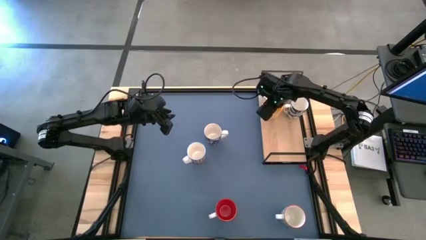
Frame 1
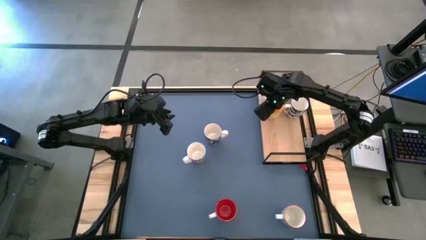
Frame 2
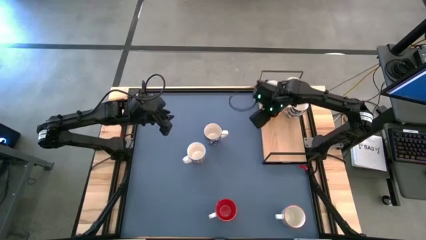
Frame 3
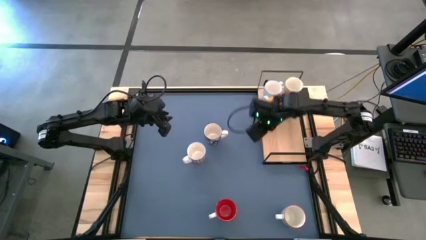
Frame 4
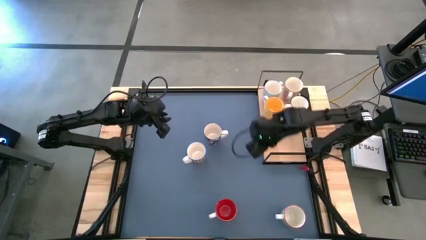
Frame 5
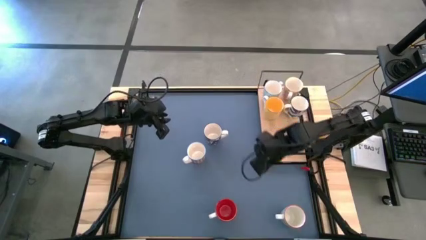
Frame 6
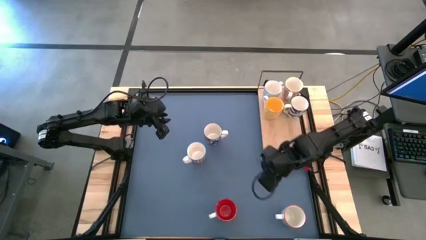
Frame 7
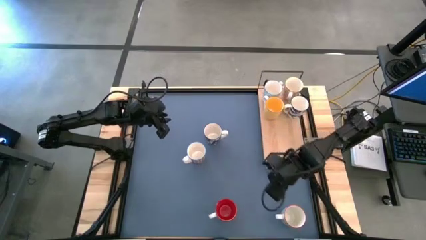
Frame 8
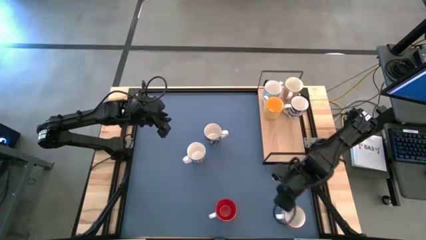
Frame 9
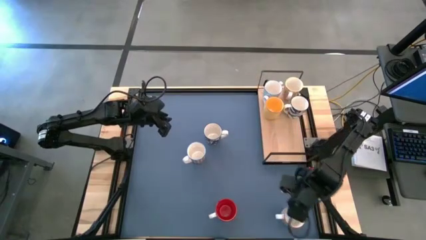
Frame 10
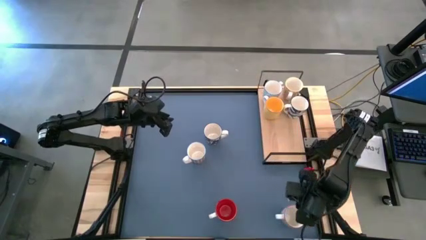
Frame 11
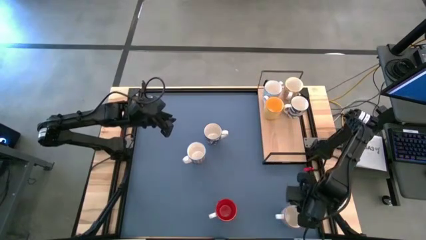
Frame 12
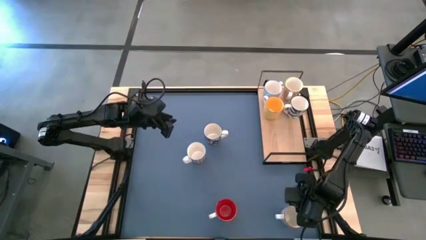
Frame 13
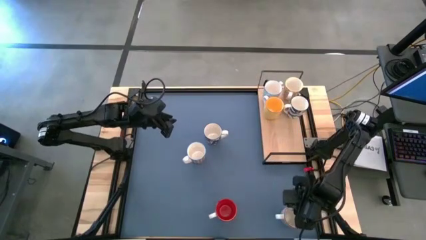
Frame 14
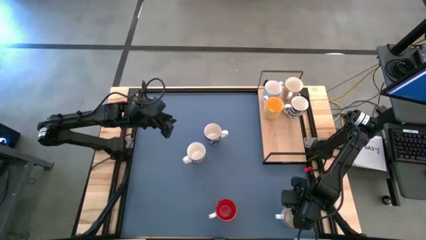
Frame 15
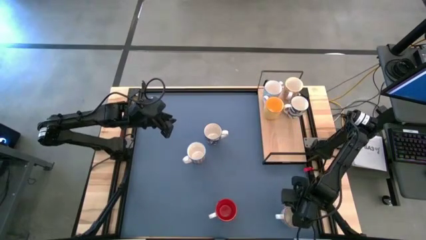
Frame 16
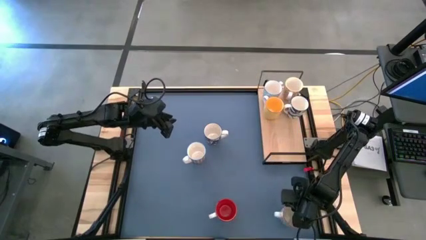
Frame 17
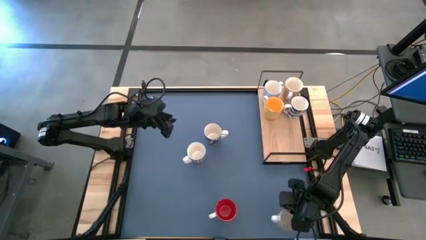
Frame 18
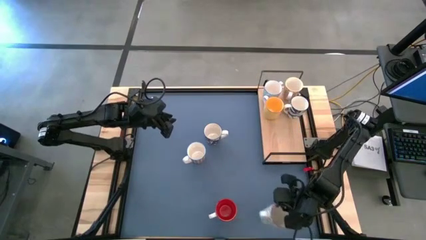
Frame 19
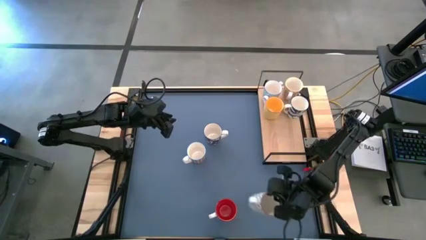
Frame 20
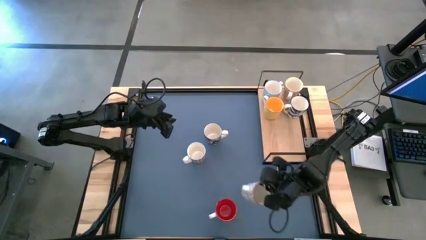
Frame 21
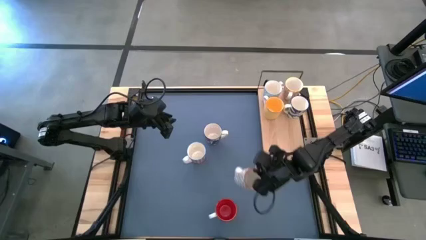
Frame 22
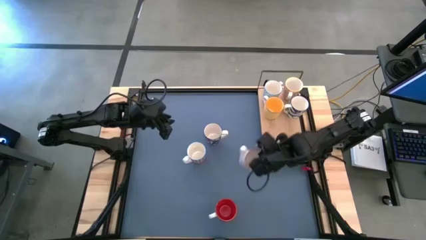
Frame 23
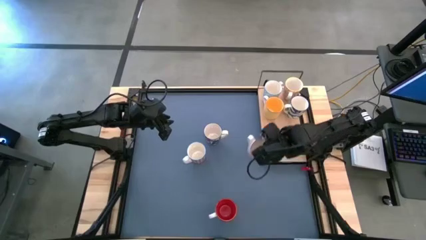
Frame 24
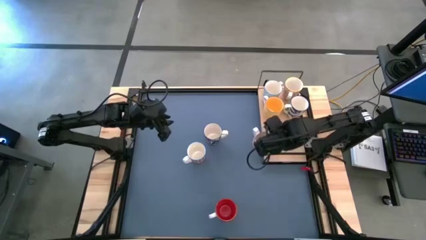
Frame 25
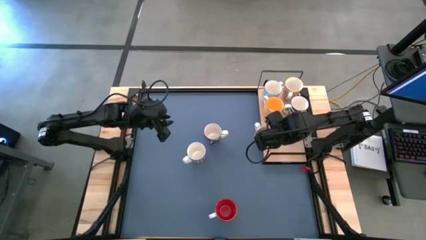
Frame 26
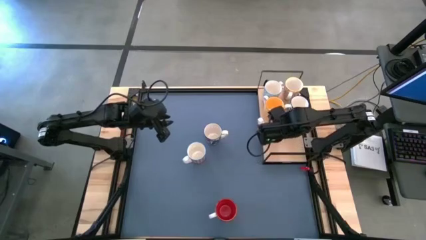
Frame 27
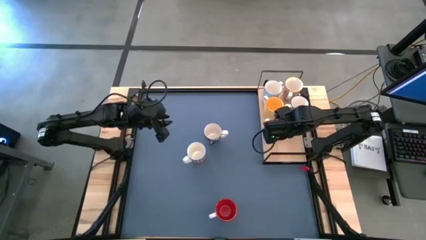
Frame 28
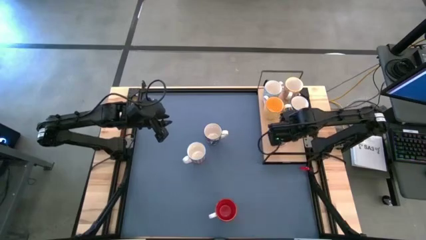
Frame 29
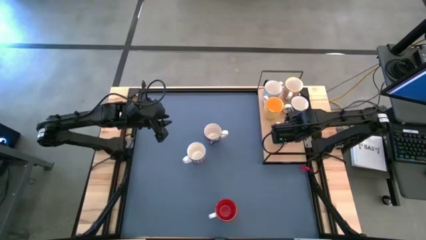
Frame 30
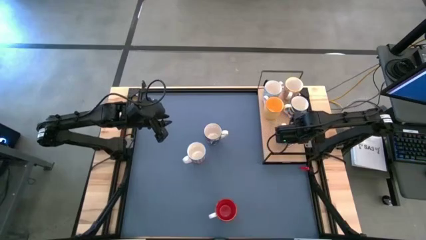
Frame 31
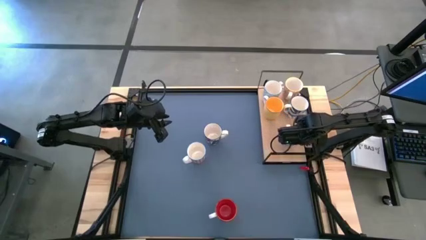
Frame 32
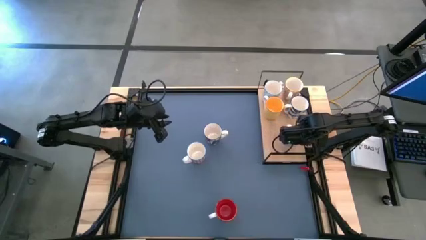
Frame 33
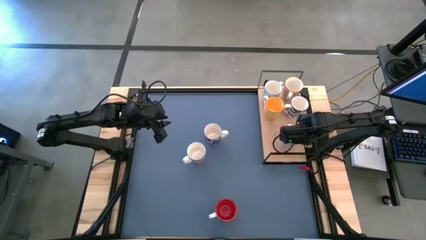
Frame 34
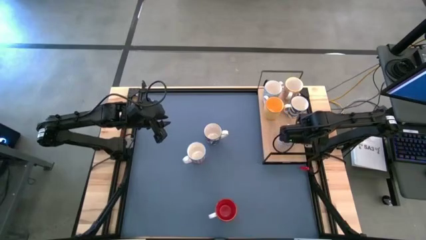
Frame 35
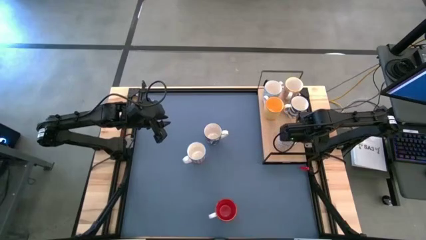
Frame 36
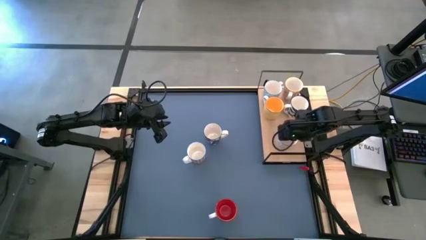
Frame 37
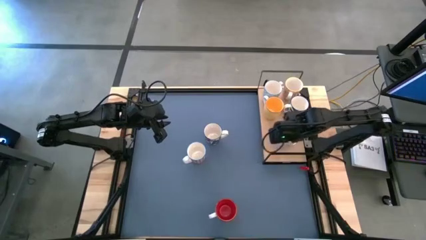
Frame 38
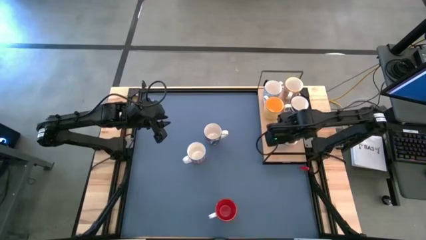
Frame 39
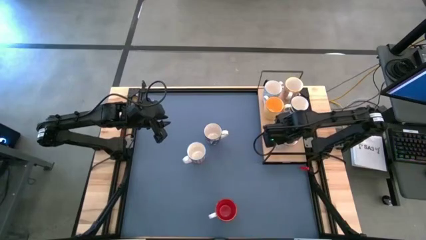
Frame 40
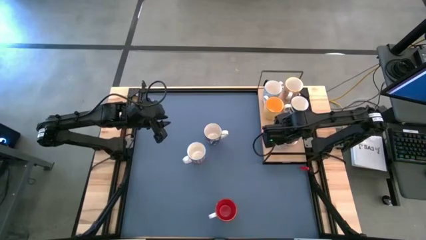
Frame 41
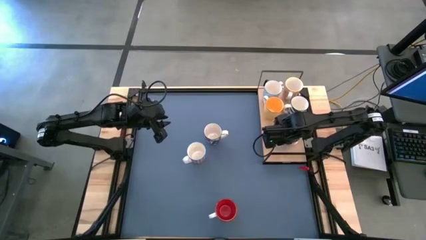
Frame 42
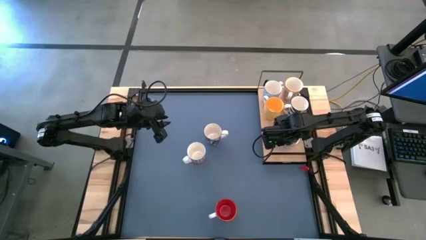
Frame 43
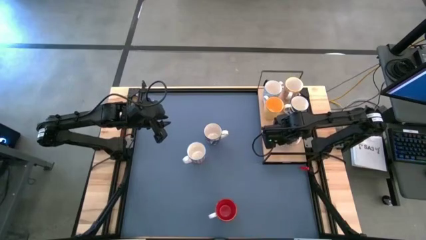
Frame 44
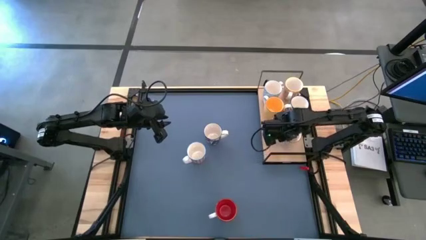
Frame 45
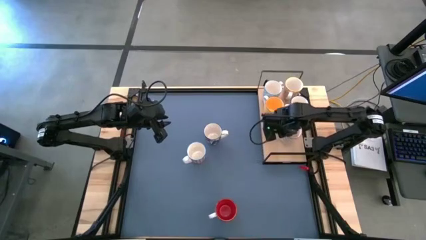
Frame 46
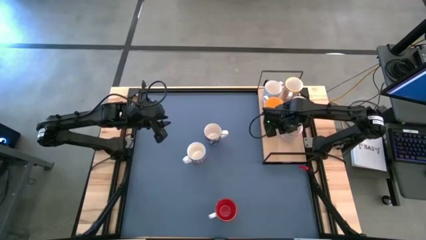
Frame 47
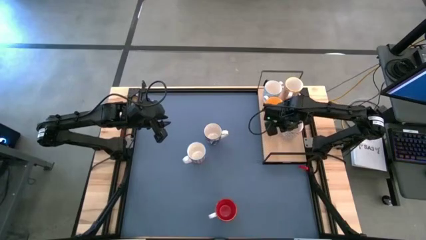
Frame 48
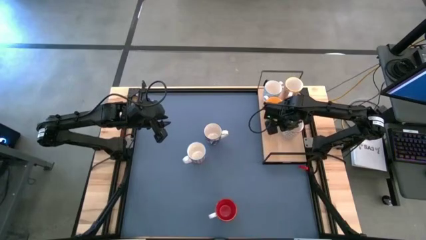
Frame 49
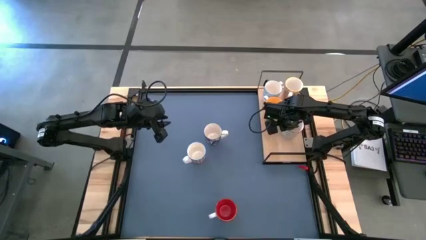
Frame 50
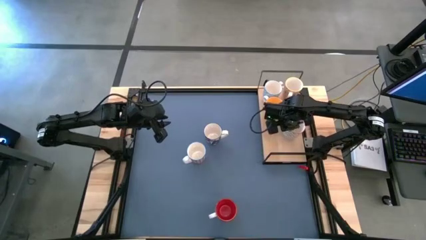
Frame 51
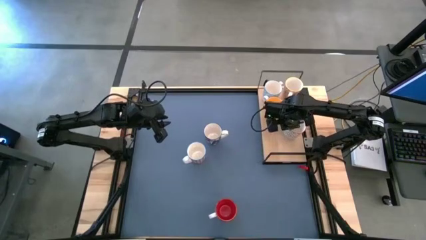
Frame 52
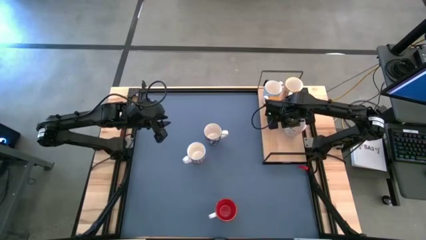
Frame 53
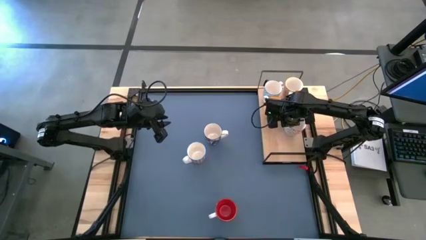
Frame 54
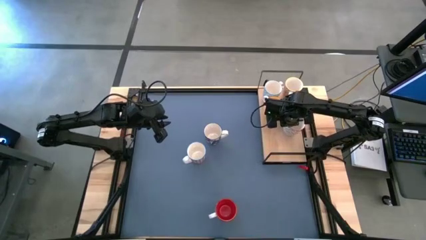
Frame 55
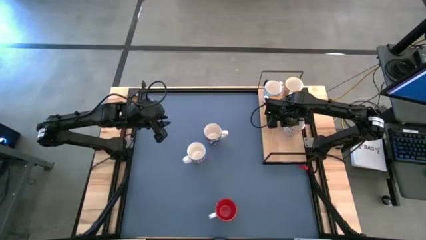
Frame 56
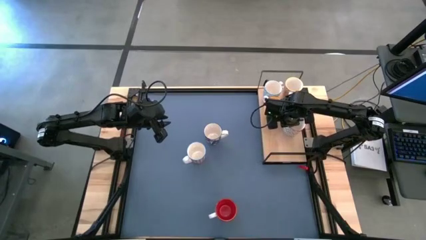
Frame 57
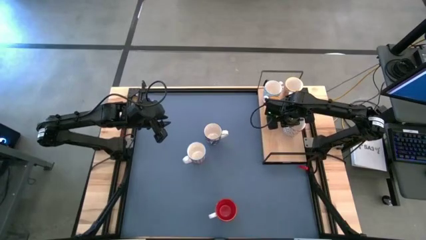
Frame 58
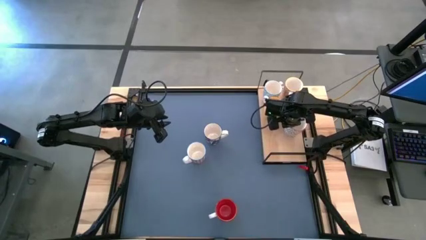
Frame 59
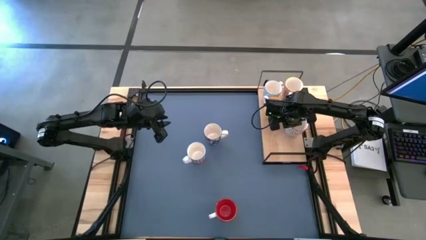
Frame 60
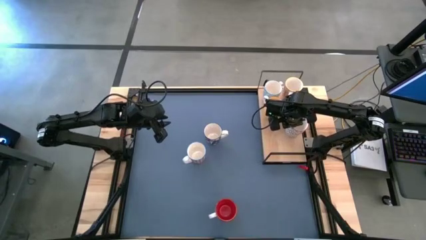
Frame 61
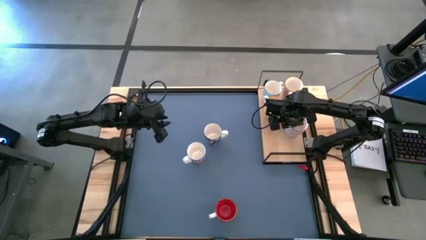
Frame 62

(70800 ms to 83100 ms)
Task: Place coffee mugs
Put the gray cup on the shelf aligned with the dark blue cup

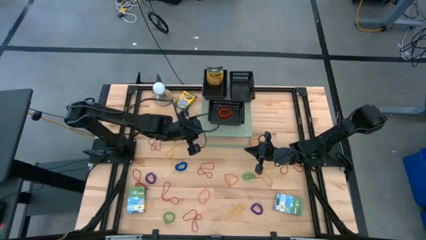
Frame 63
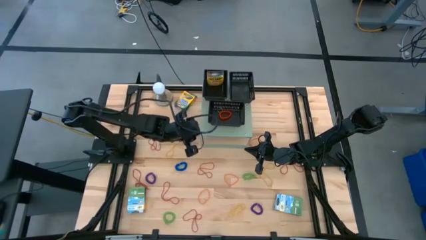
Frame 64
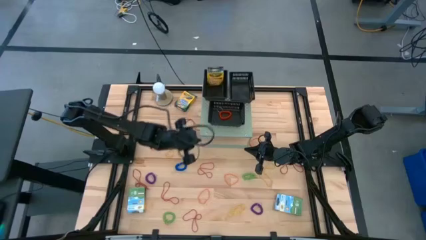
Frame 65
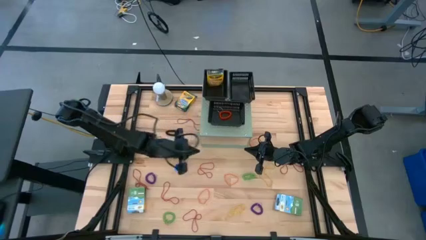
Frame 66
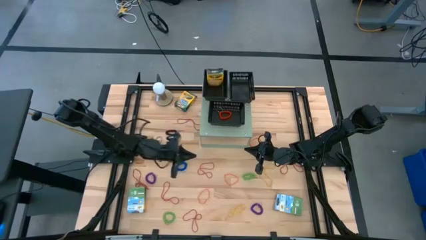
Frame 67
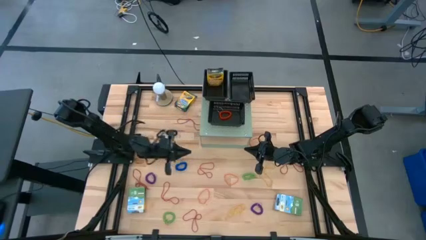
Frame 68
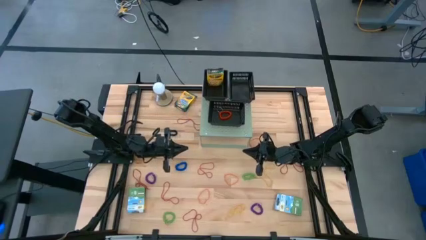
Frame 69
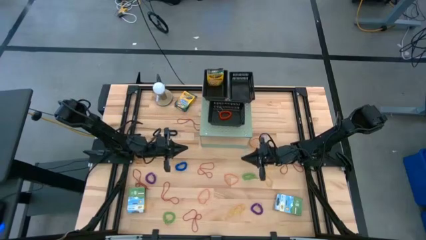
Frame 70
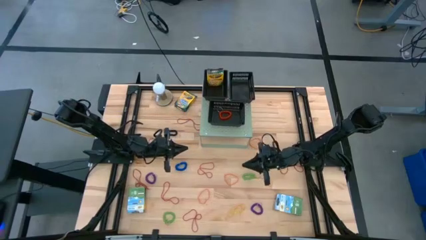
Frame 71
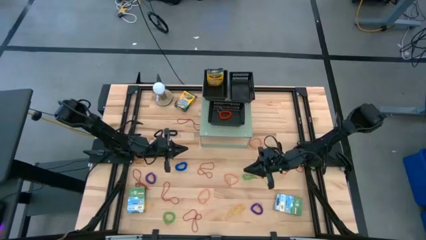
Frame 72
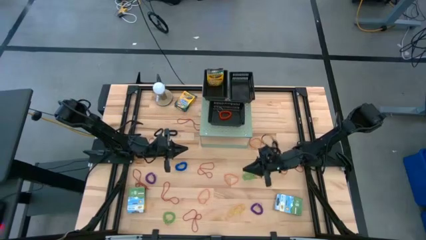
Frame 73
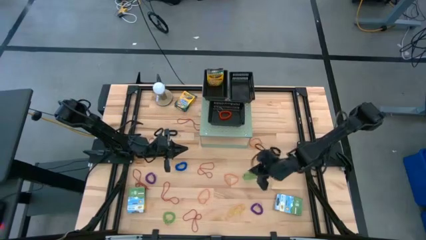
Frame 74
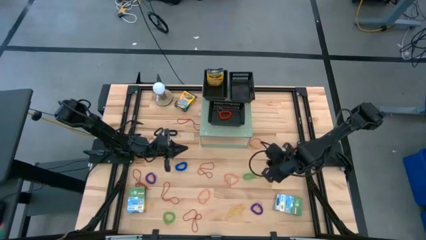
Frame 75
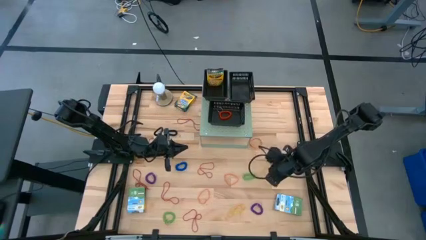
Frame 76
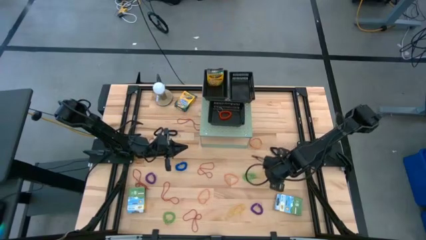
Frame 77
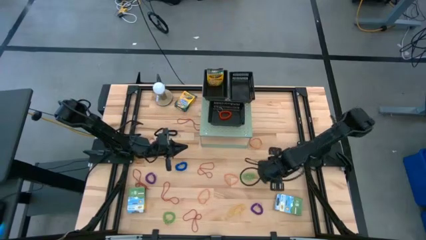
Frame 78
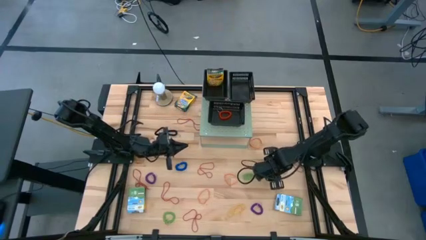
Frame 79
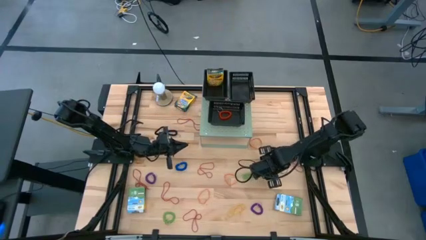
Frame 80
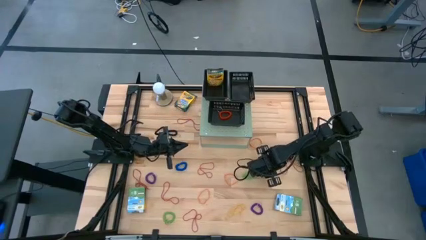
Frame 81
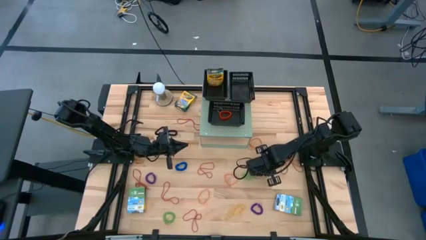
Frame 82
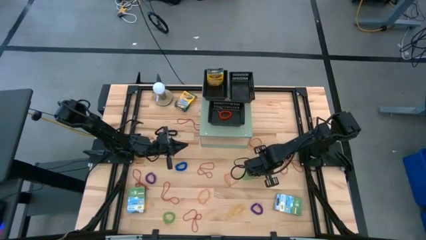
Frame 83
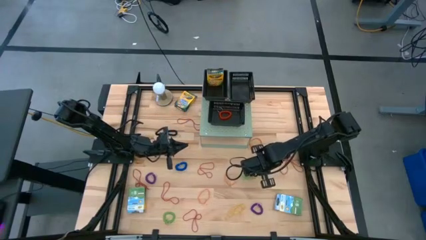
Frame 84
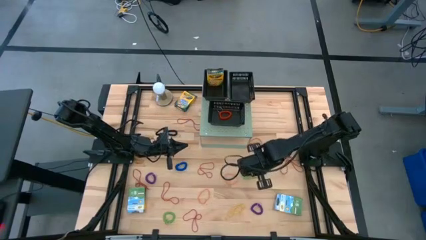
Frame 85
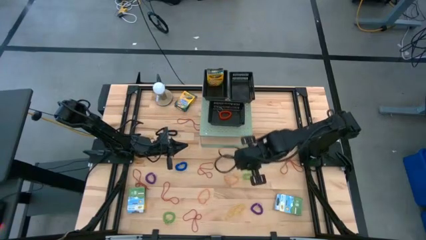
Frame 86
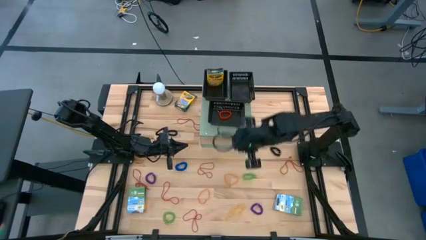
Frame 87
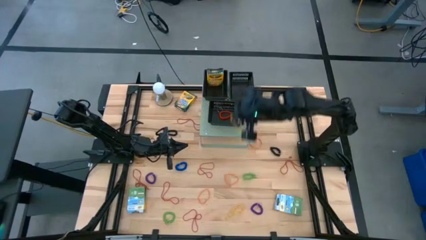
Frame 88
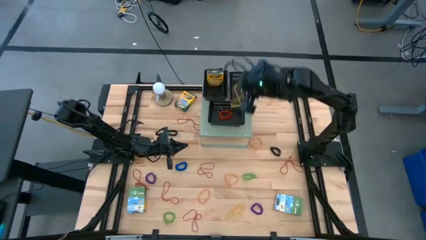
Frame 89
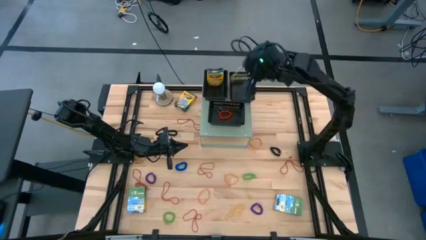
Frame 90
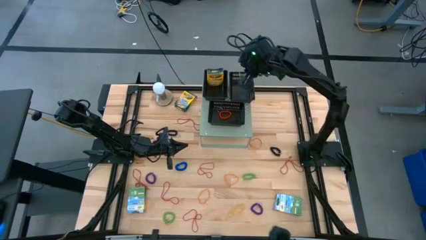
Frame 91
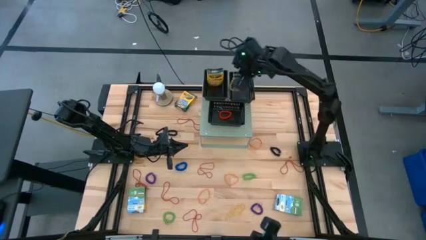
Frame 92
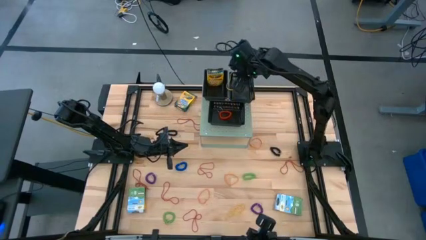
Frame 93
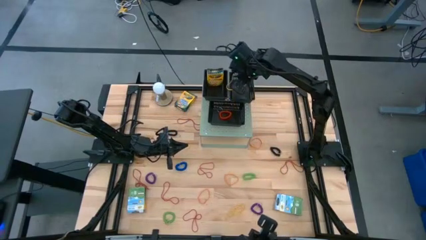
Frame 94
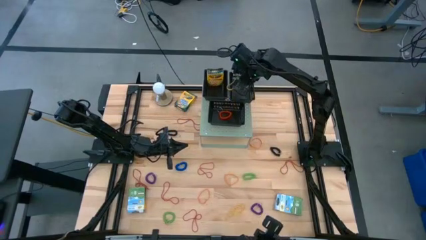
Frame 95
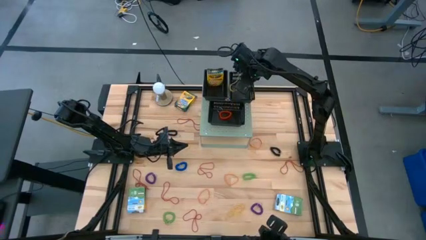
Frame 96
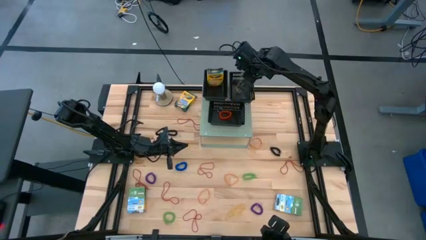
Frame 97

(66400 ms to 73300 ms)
Task: Pick & Place Office Desk Supplies
Put the yellow rubber band into the top right black bin on the shelf
